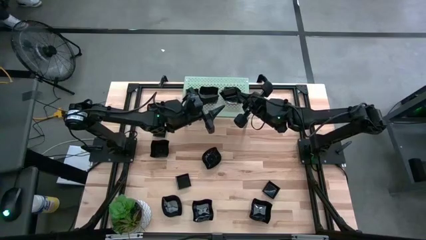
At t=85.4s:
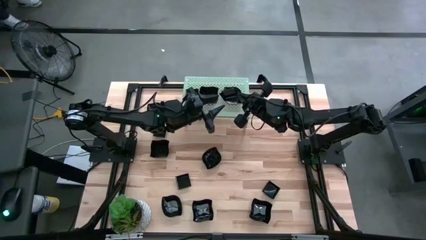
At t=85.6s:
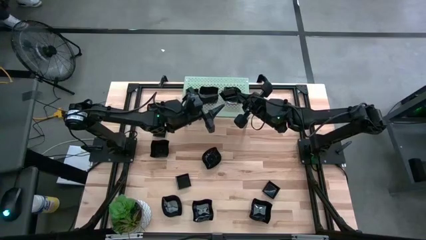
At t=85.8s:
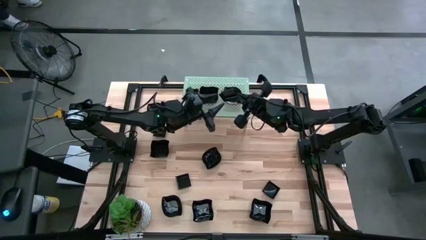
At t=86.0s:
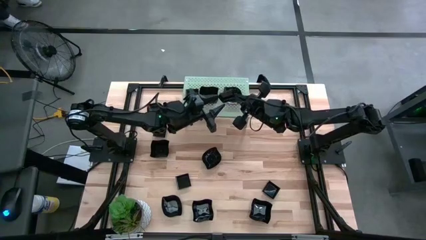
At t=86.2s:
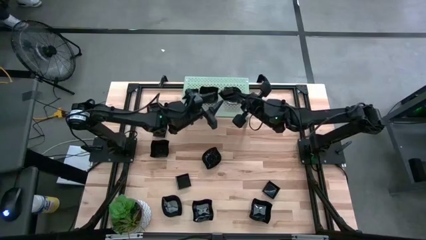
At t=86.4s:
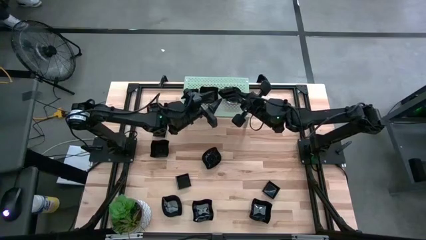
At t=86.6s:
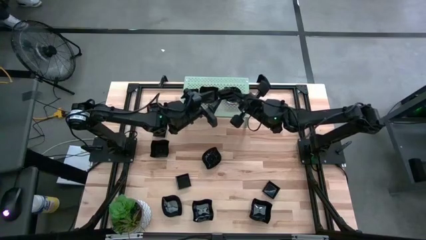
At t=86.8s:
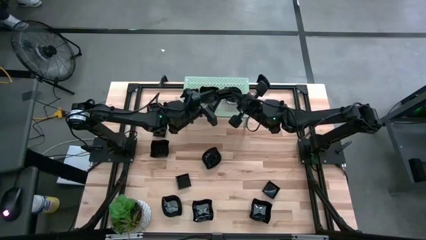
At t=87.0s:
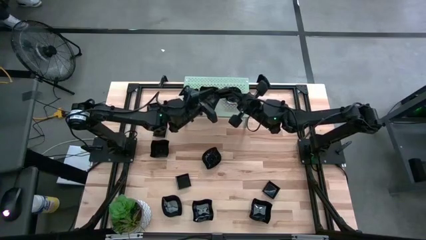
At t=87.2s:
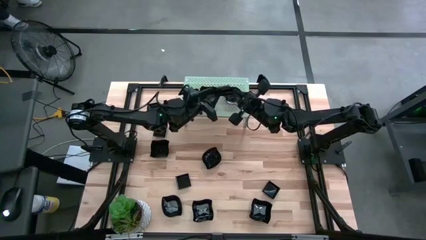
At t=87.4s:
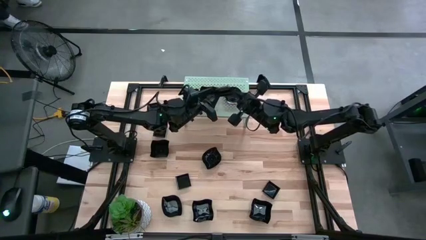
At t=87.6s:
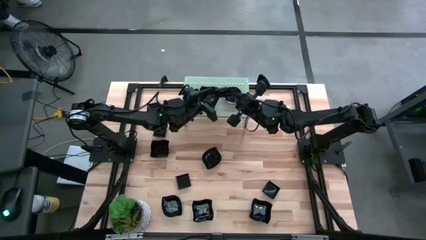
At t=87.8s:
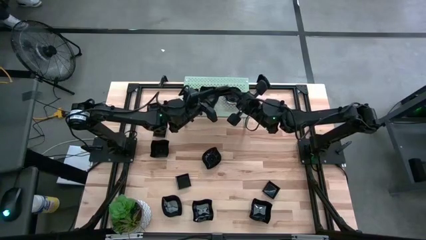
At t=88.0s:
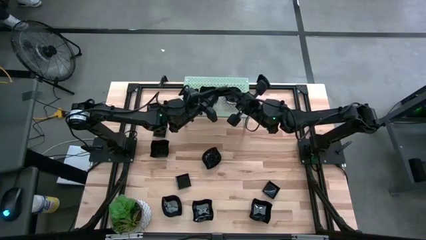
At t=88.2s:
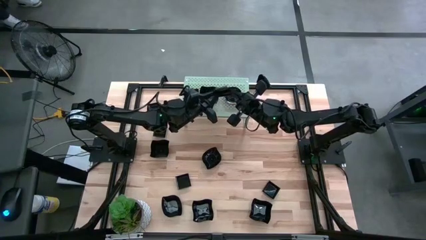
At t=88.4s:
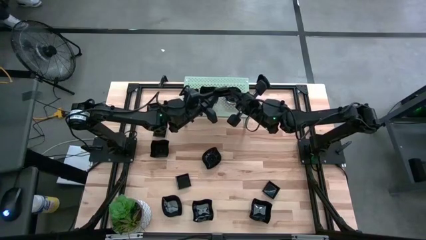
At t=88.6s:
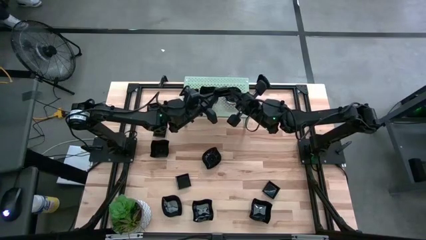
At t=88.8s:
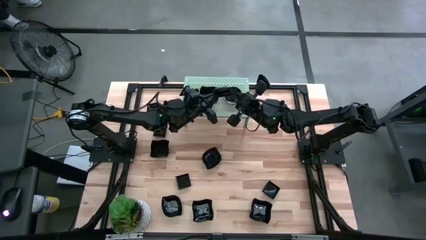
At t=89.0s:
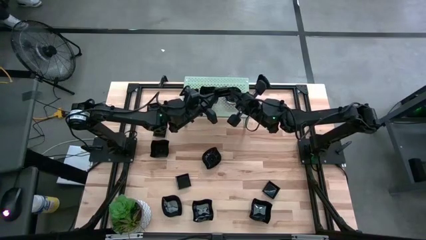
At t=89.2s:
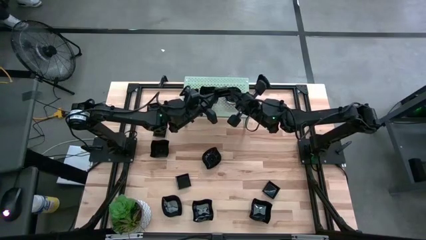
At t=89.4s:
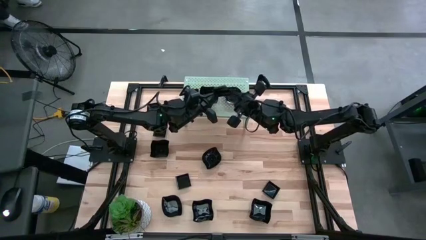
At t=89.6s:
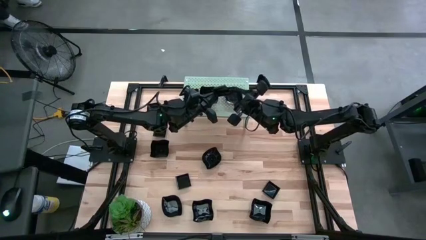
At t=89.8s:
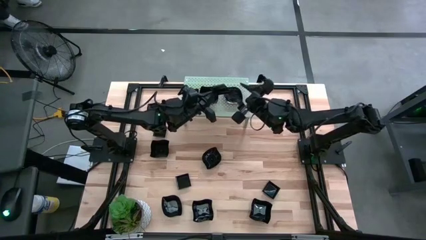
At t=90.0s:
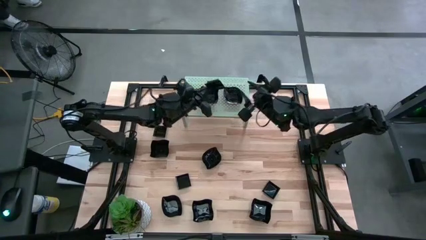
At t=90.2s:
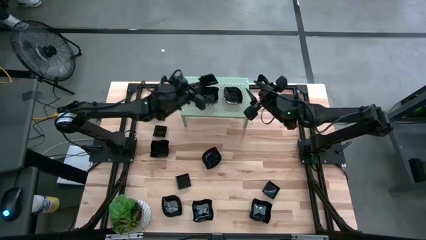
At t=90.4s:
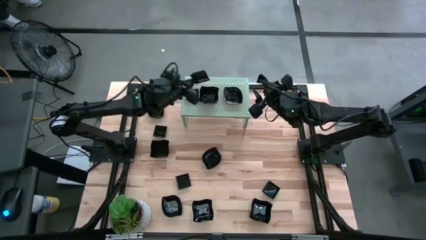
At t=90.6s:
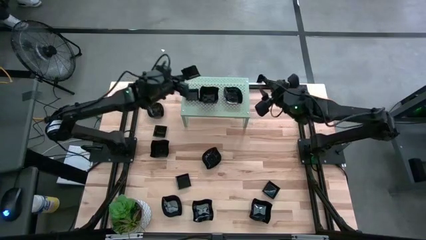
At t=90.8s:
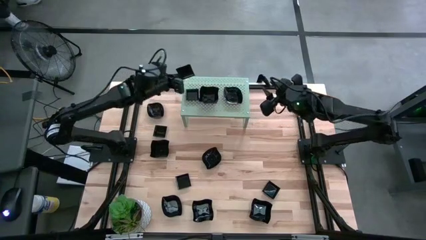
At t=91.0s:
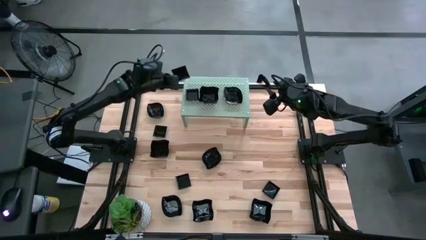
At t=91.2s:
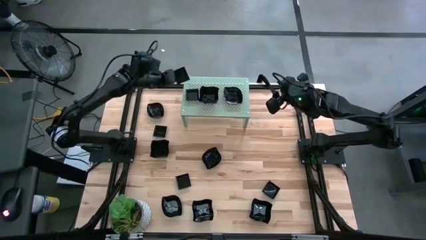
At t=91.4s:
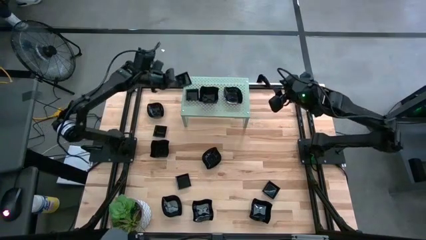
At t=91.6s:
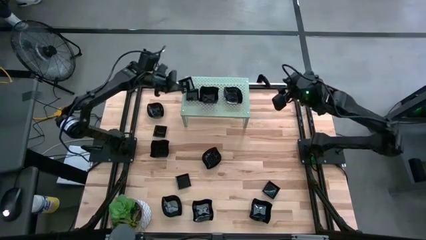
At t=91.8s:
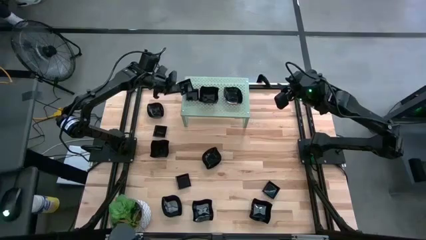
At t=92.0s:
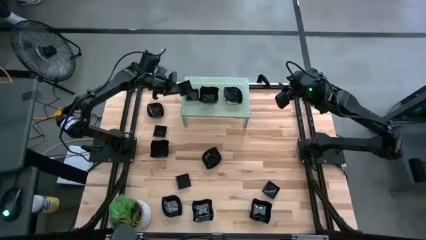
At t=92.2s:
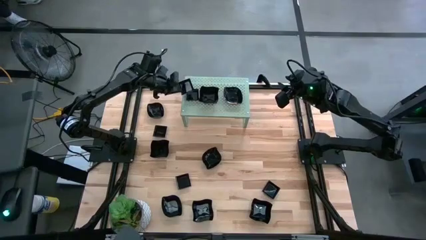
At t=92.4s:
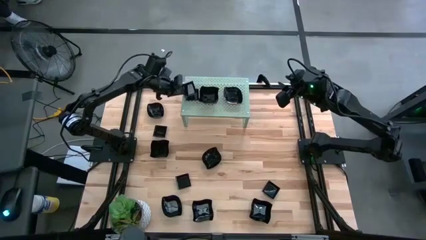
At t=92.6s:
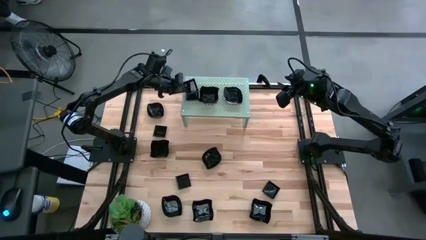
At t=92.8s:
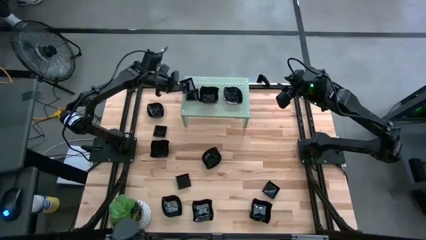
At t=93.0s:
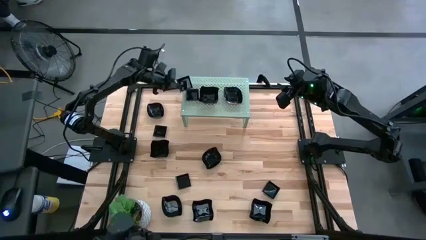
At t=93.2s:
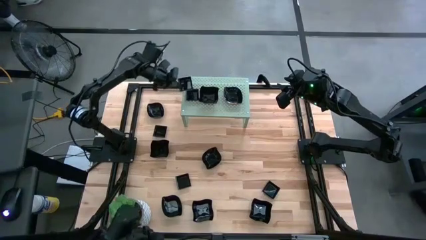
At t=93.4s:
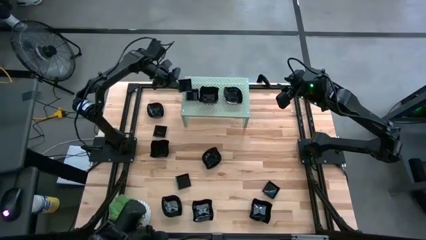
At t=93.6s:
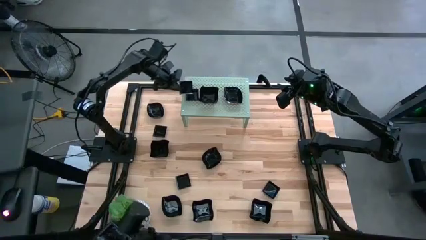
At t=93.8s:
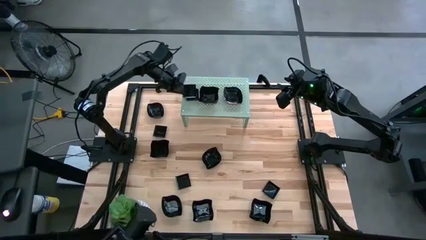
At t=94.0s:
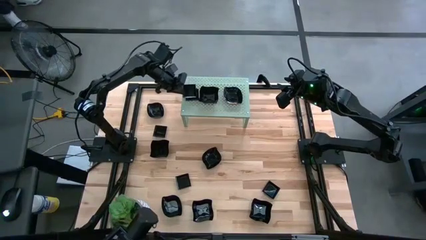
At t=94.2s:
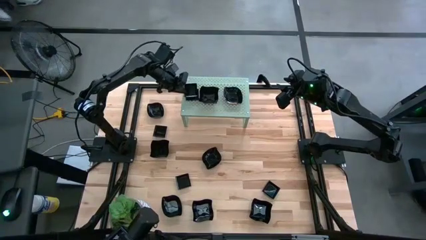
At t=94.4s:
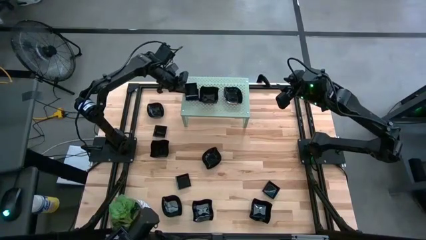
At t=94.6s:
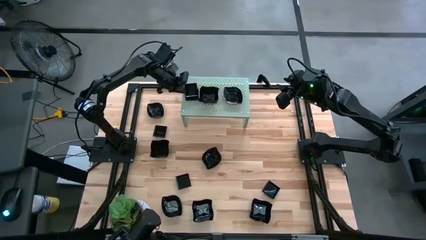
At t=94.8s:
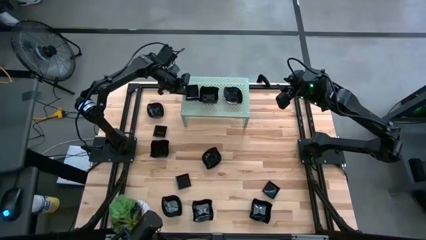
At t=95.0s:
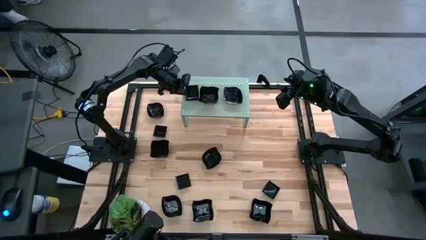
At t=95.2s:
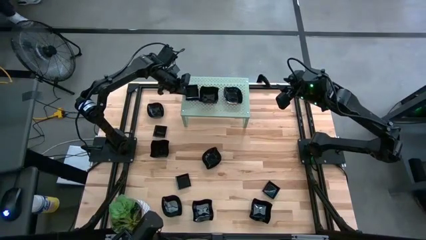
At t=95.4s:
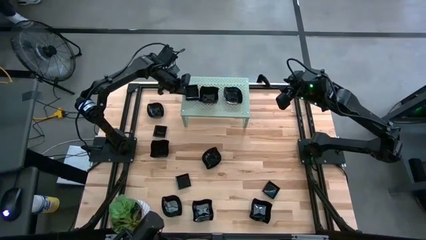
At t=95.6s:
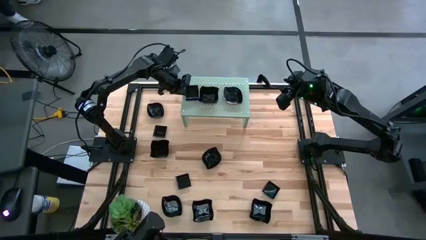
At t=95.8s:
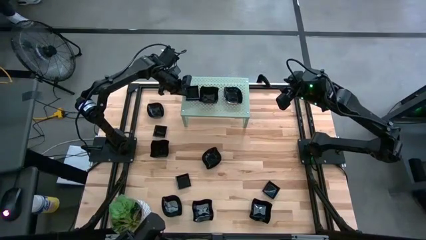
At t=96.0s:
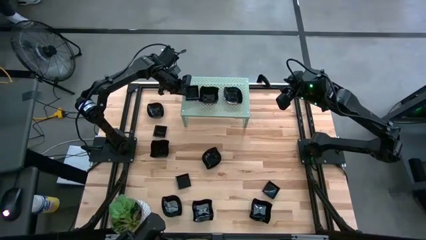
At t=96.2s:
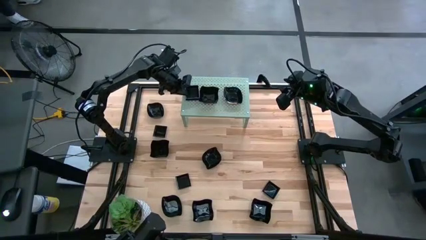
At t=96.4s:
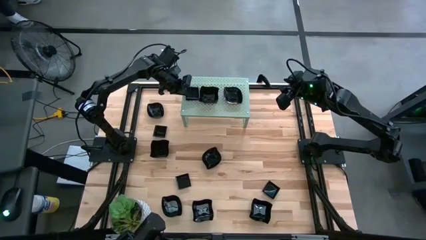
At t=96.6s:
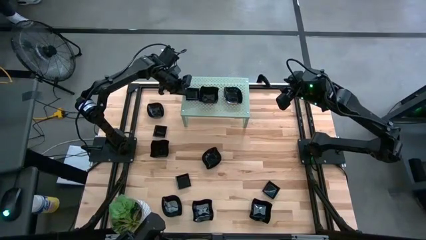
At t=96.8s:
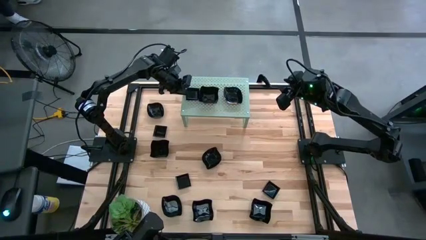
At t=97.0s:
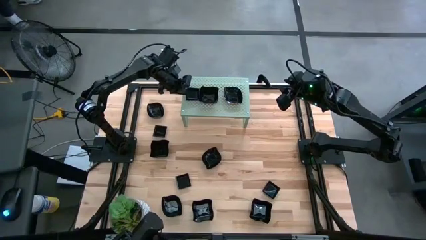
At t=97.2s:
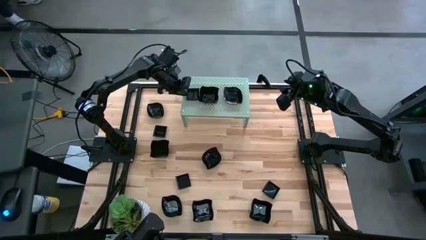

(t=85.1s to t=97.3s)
Task: Pick & Place Mini shaped plates
Stack the square shaped plate on top of the square shaped plate on the shelf

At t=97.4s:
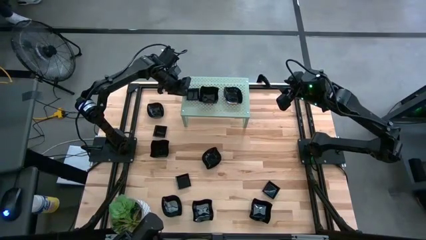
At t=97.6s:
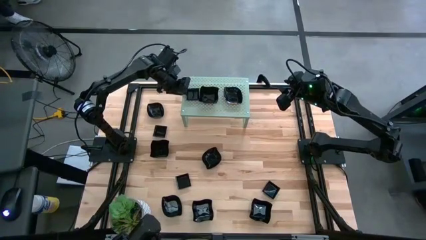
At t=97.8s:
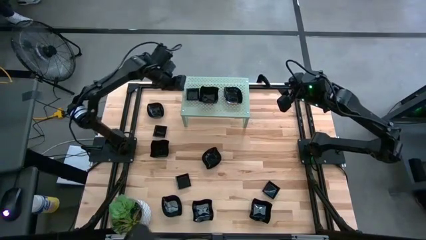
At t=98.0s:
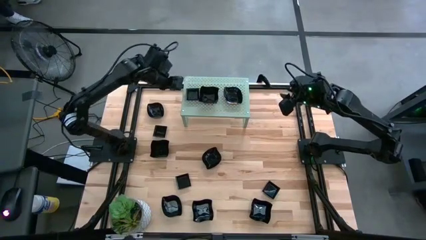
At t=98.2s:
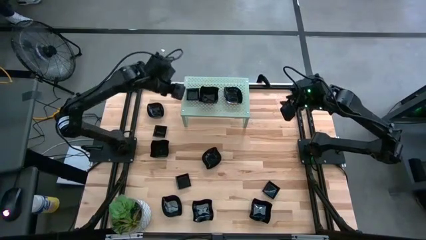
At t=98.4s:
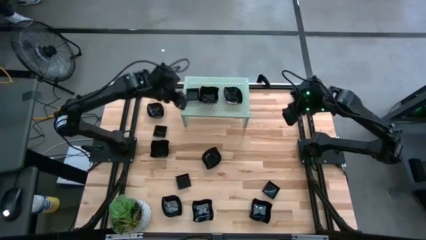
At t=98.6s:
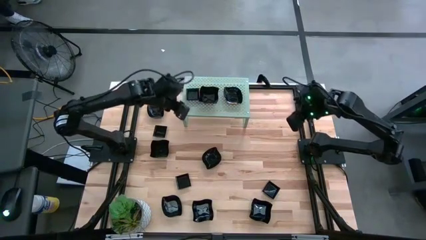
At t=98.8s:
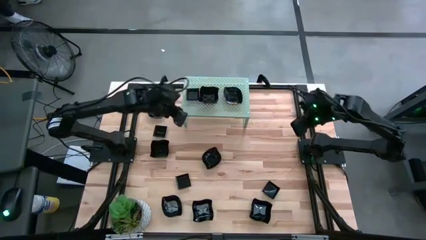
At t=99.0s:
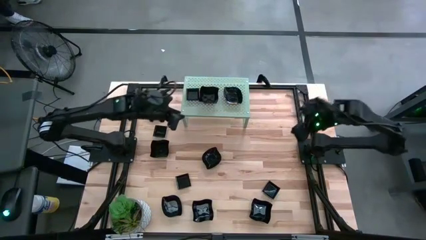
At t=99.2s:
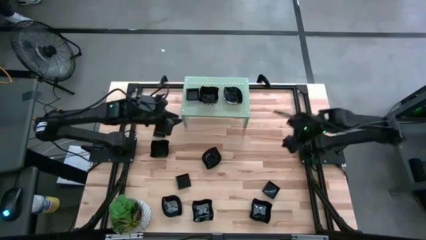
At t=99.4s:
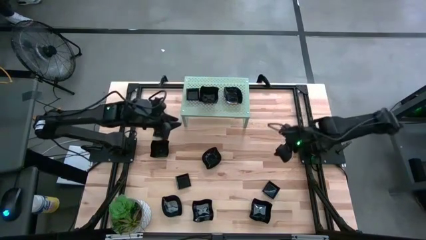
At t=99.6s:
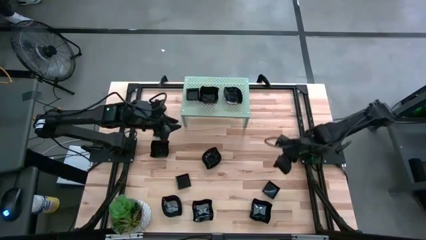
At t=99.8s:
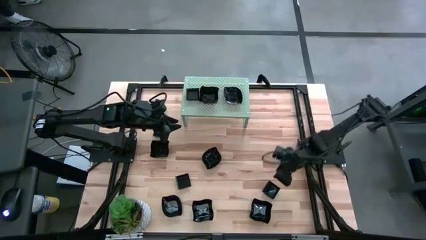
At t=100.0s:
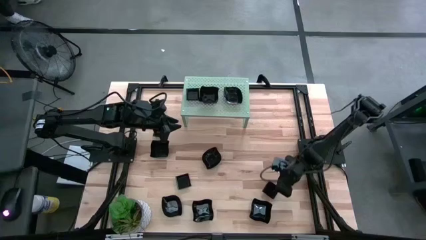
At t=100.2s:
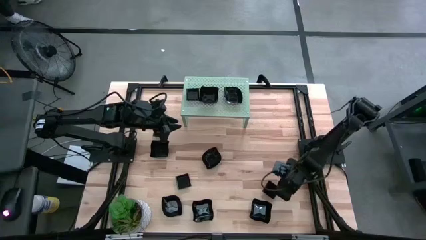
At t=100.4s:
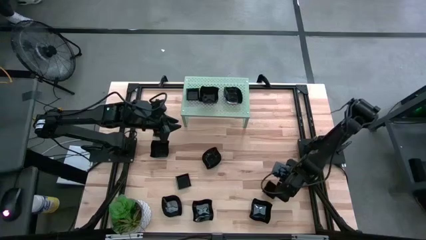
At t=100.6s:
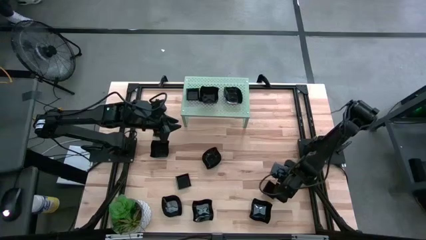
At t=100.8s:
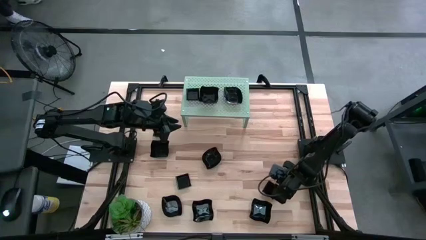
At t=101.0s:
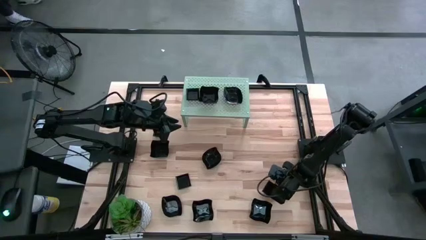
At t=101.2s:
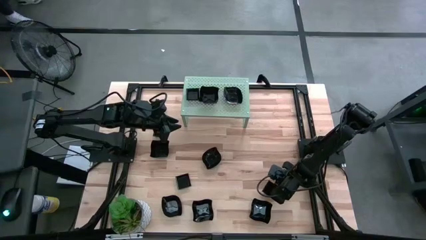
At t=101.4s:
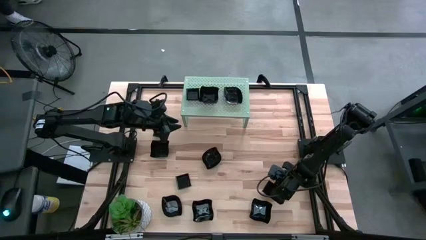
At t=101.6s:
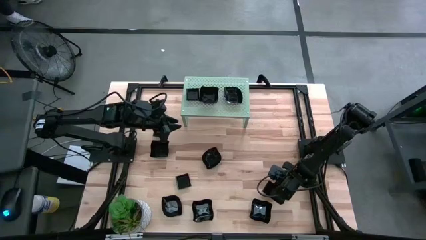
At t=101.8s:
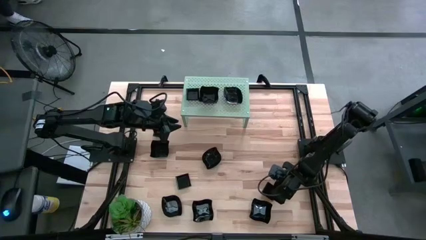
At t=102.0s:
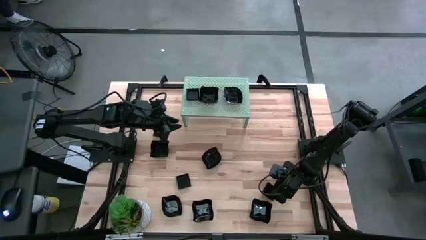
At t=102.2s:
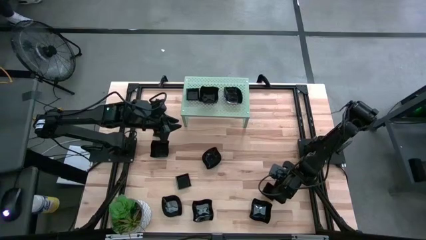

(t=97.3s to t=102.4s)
Stack the square shaped plate on top of the square shaped plate on the shelf
